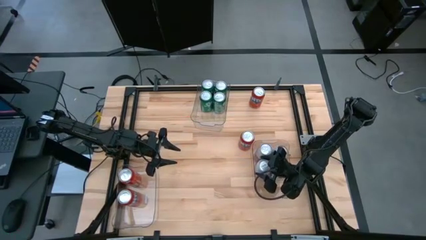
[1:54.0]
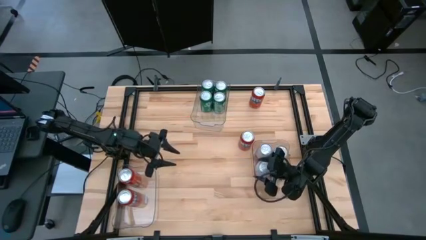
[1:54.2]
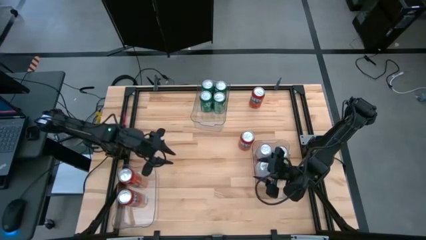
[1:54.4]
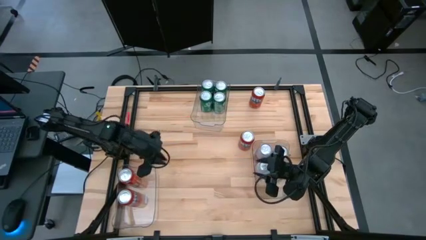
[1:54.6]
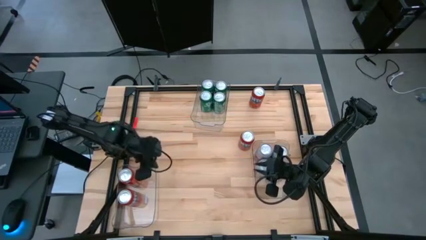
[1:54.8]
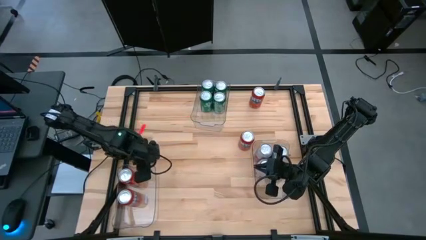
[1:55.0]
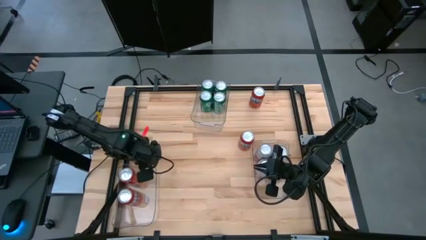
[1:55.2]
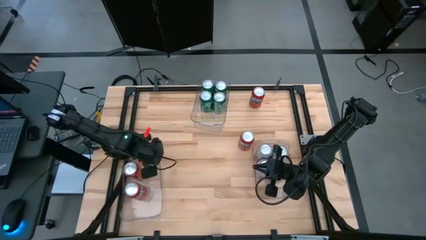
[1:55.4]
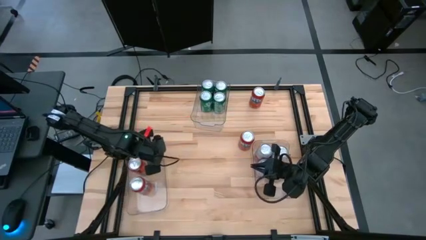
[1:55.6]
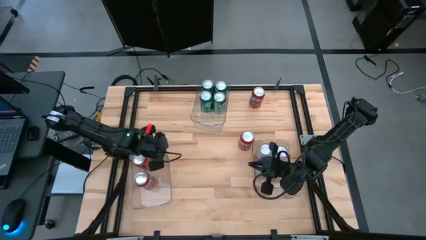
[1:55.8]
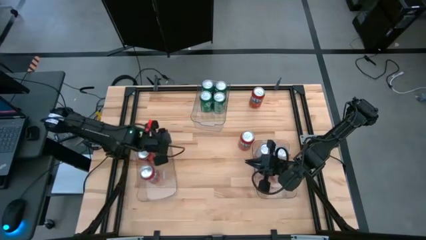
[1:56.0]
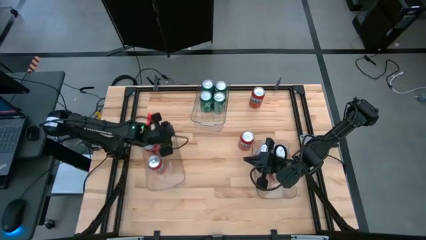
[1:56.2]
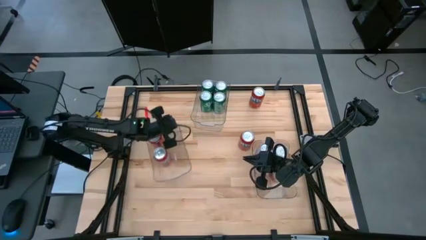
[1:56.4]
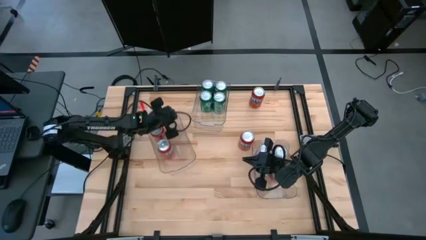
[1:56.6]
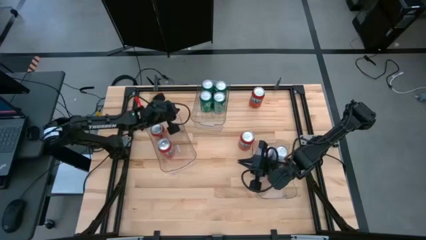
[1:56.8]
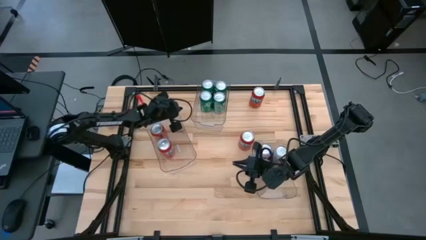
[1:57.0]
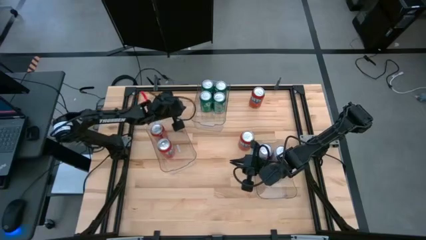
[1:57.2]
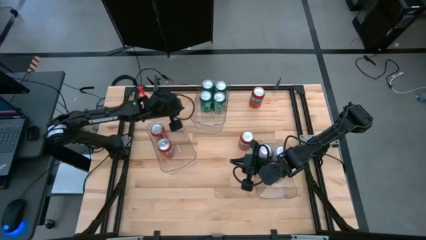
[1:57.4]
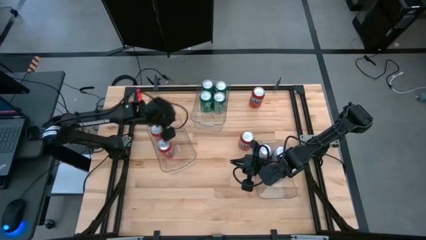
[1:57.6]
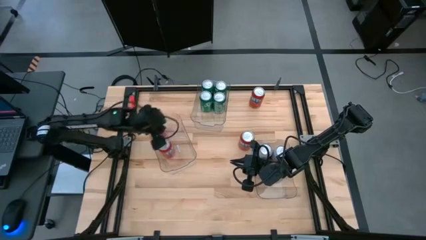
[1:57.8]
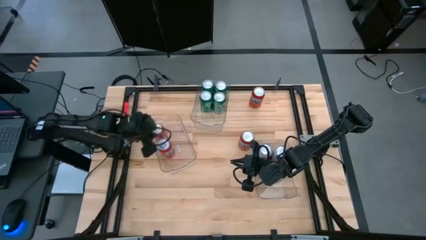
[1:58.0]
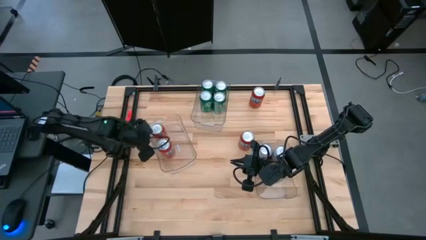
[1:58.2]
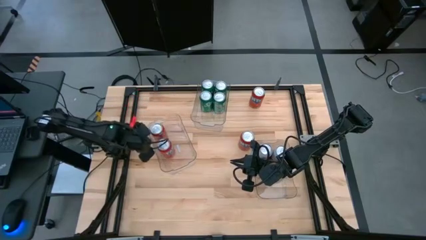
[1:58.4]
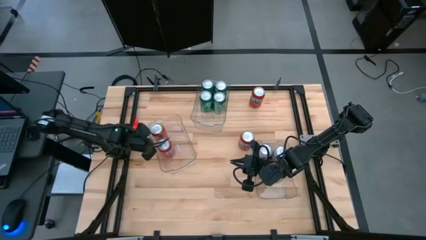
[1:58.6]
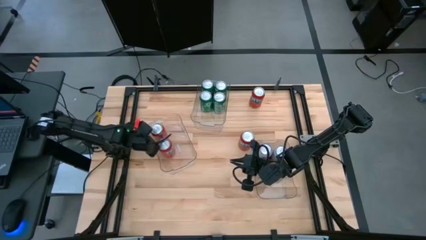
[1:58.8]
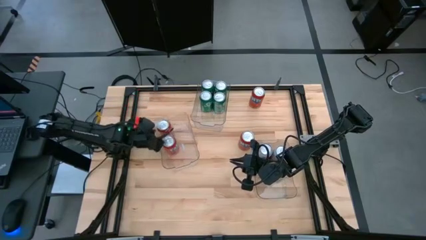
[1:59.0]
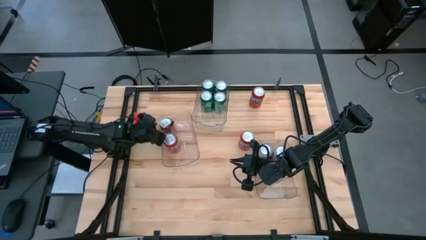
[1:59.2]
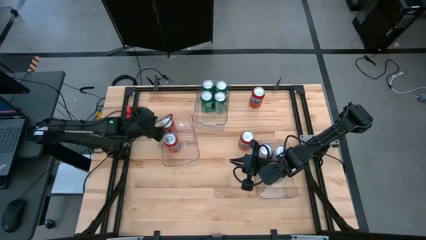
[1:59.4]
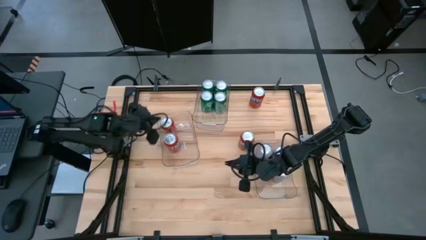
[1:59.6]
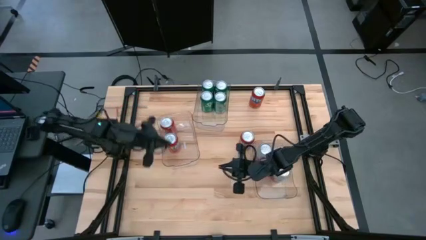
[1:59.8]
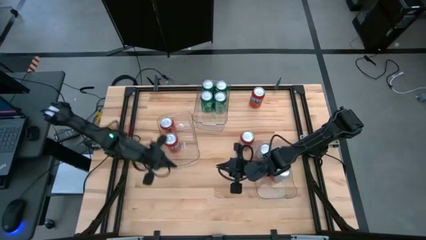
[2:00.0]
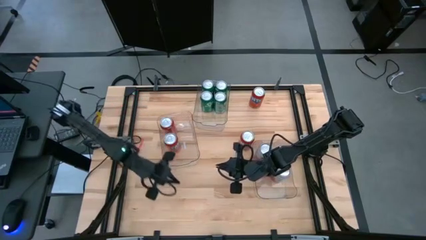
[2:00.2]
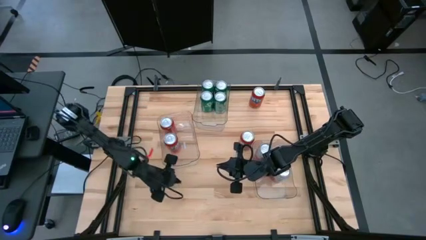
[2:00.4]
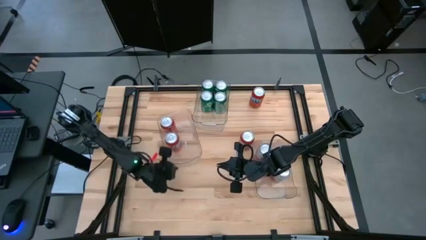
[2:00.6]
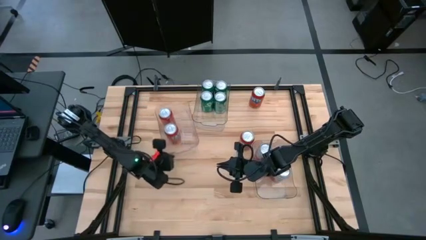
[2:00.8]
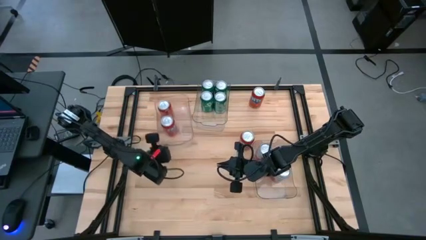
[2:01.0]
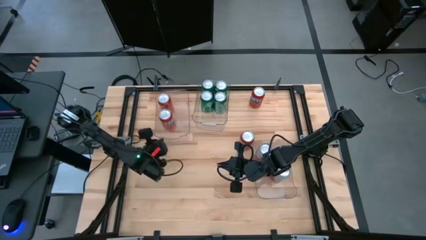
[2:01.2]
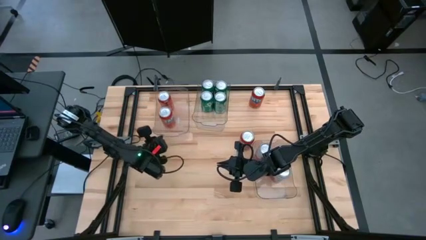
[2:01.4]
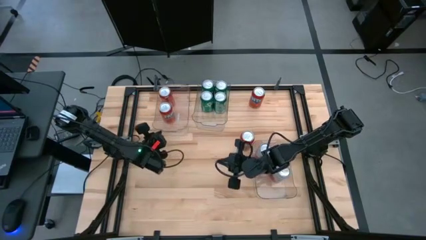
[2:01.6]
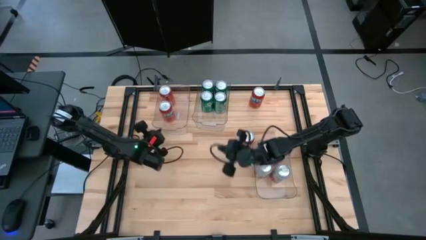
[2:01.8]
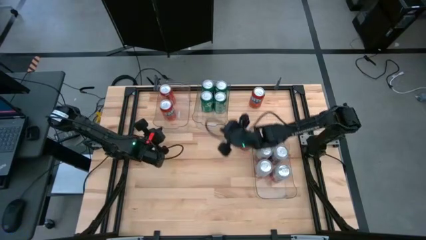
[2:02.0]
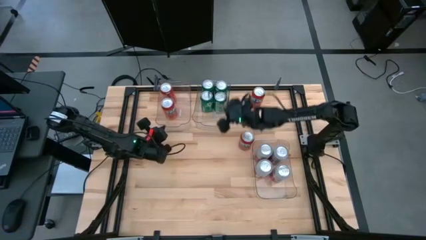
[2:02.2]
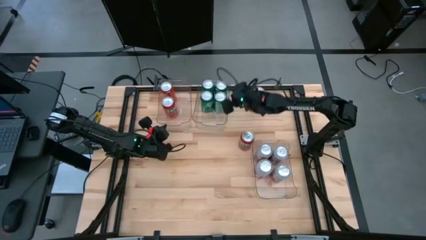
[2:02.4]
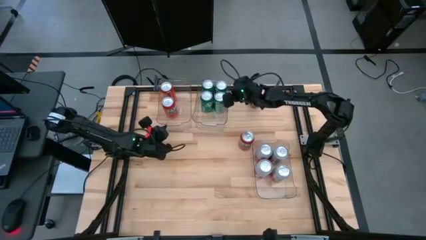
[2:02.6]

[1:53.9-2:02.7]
Task: Sort soda cans
Move the bottom left transparent bin to the top left of the table

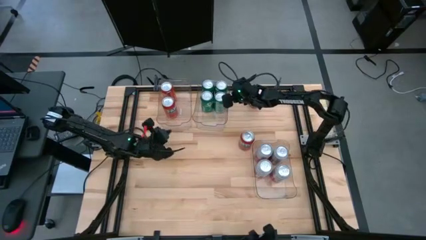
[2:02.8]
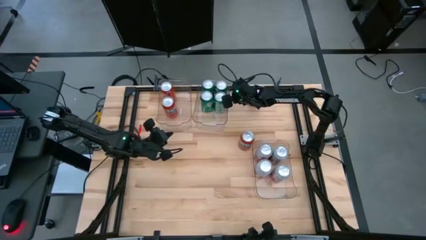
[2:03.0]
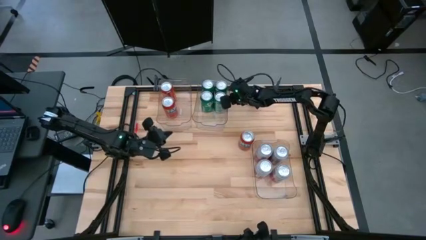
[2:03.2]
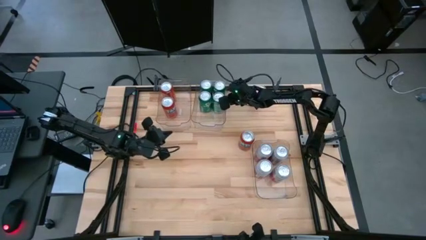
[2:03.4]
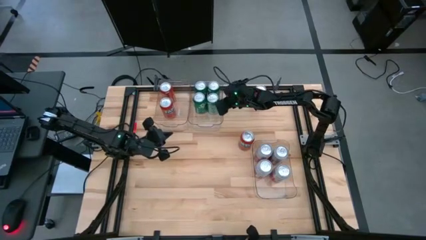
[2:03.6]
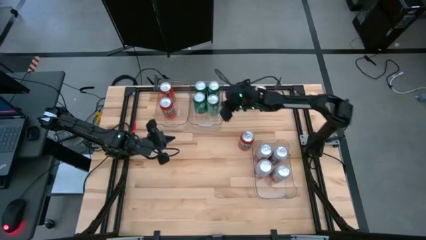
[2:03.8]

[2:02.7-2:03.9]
Adjust the top center transparent bin on the table

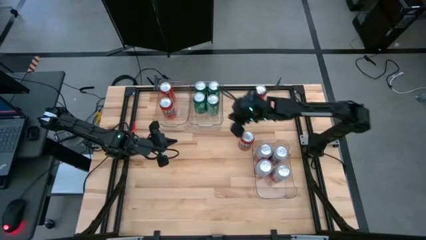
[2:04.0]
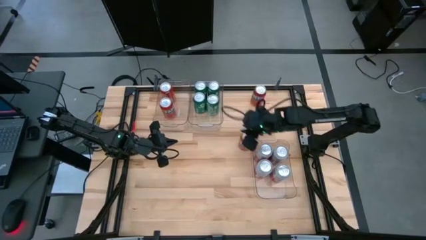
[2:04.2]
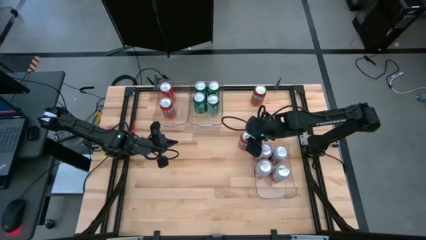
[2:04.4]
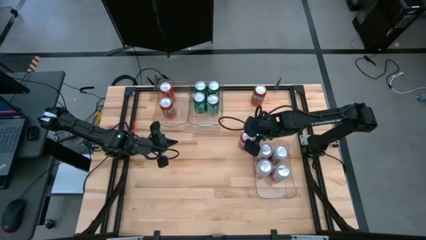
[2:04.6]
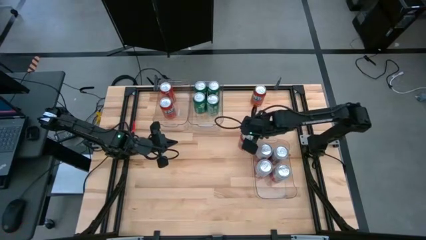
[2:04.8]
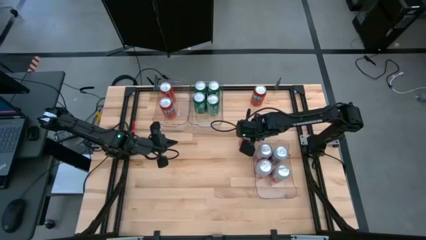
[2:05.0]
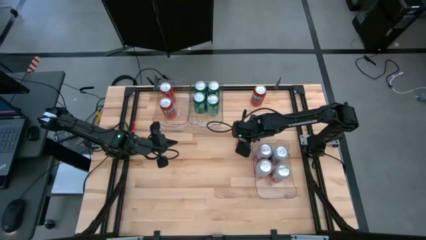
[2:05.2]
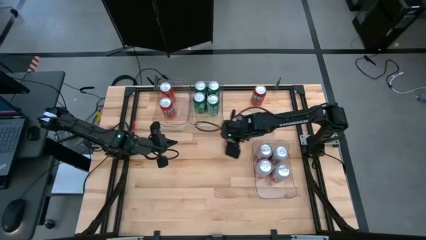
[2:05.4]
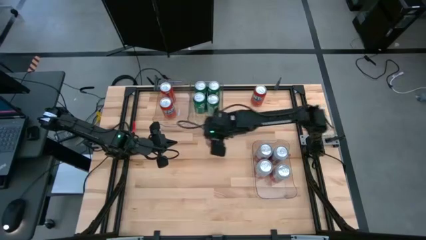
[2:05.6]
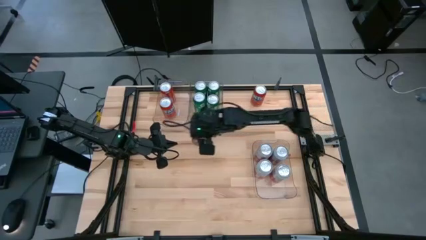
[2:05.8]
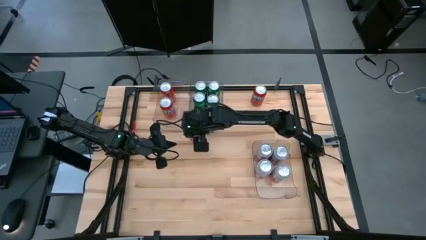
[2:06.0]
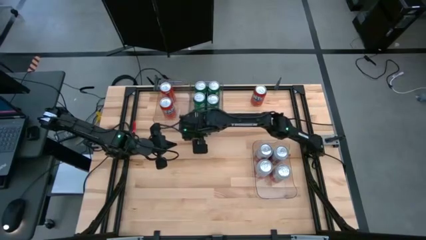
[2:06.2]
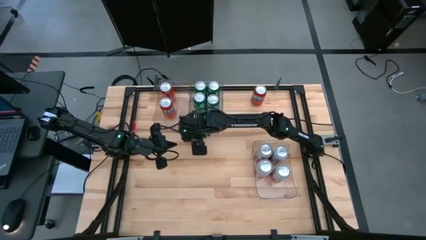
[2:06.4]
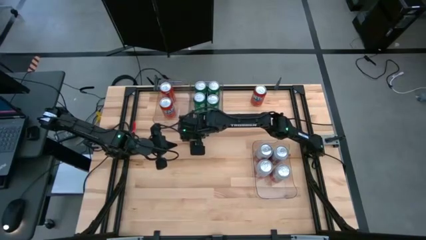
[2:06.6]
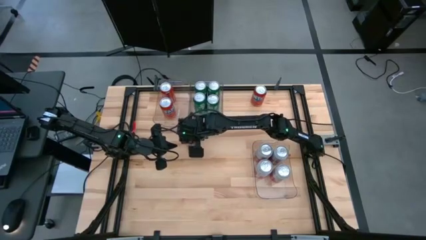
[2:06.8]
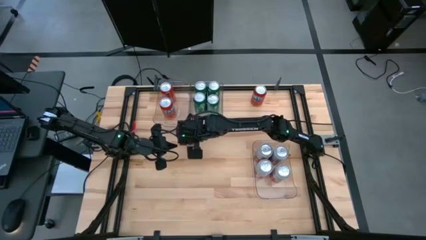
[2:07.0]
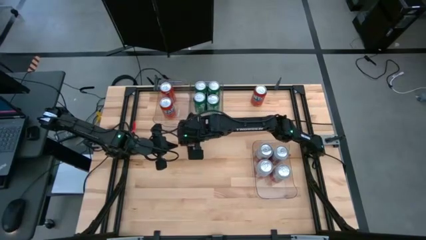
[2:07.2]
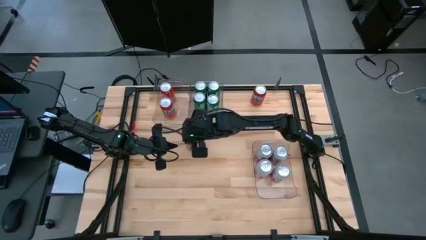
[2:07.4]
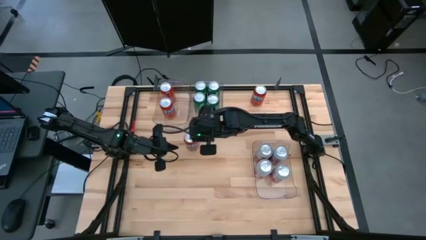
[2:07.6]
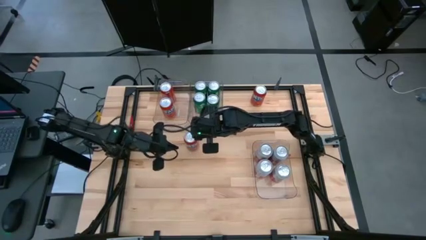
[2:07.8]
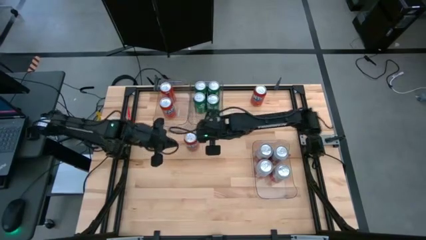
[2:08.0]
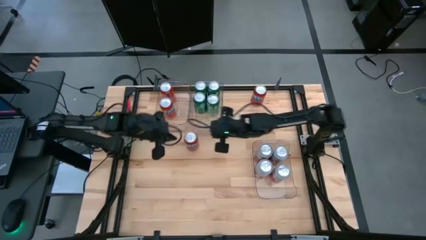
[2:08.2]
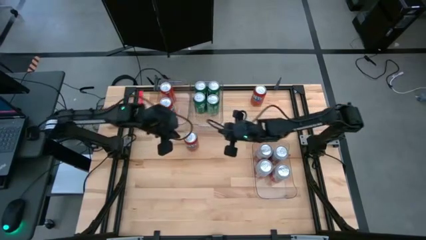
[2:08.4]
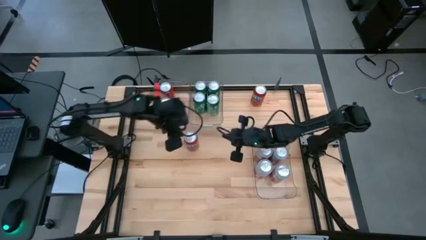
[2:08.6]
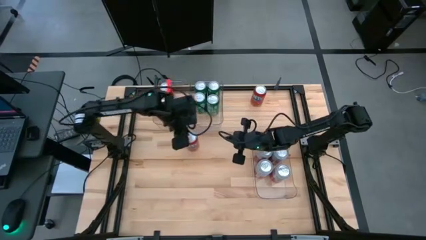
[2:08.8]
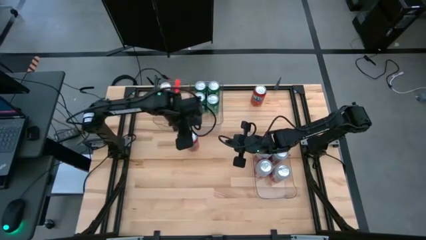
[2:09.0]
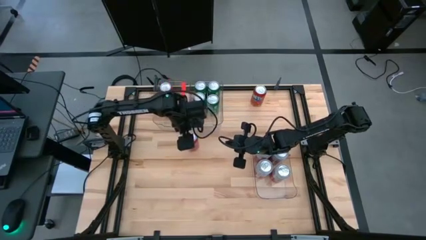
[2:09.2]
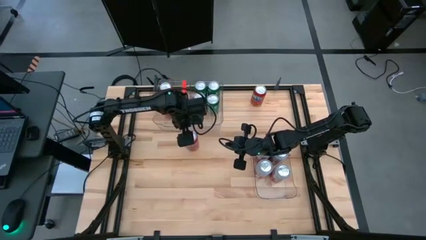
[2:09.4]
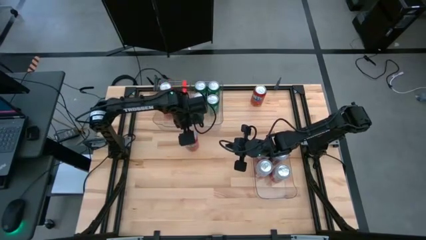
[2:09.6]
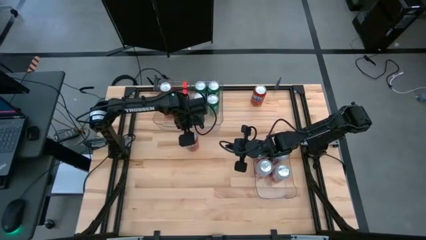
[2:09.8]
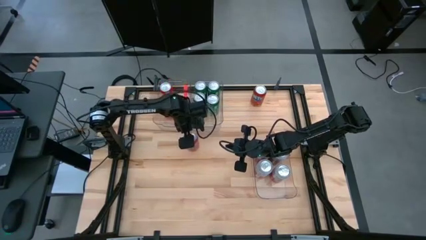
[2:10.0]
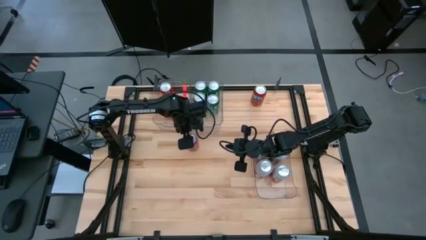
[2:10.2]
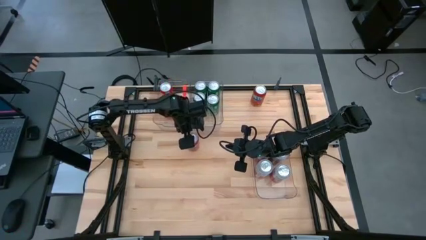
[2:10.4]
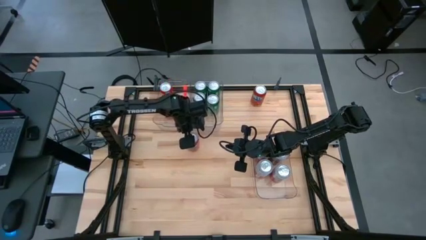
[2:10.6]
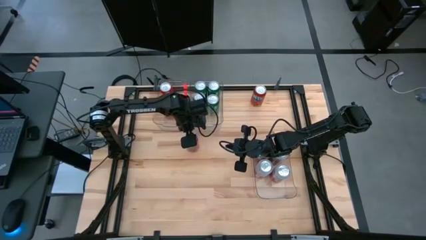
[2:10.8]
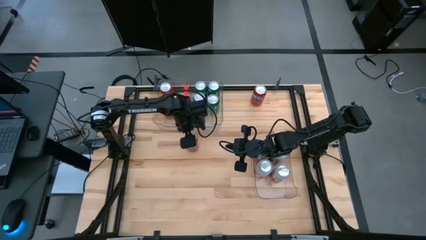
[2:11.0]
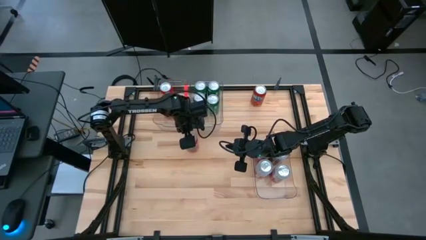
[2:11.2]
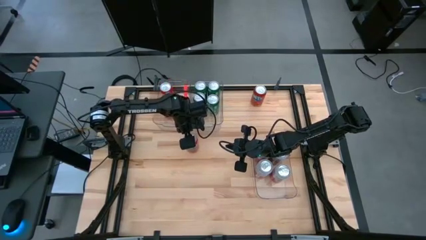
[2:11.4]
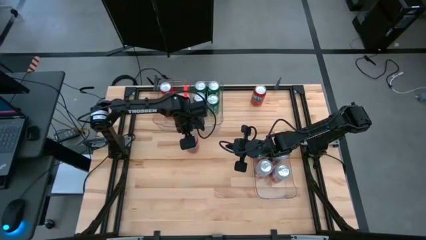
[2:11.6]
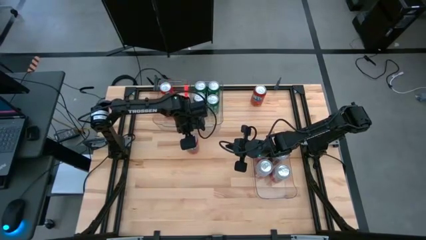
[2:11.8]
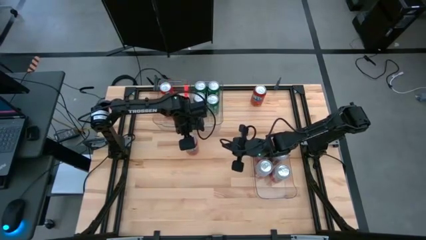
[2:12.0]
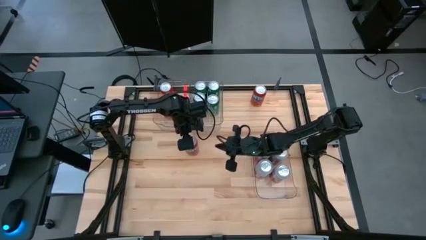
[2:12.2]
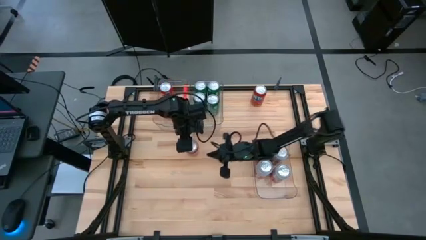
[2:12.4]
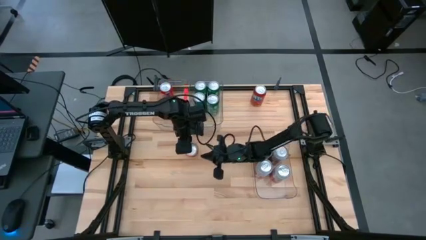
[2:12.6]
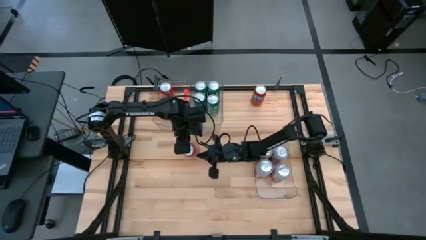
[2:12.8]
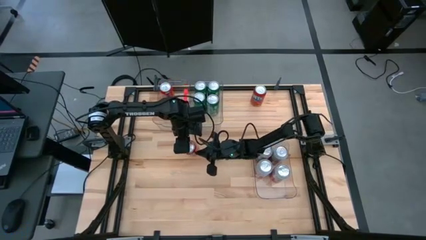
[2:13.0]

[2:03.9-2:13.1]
Put the bottom red soda can into the top left transparent bin
